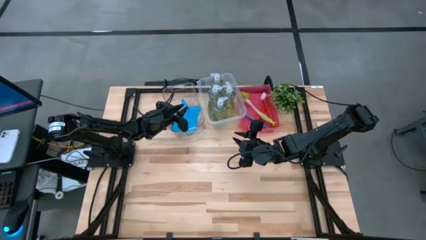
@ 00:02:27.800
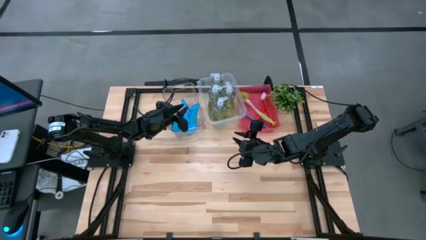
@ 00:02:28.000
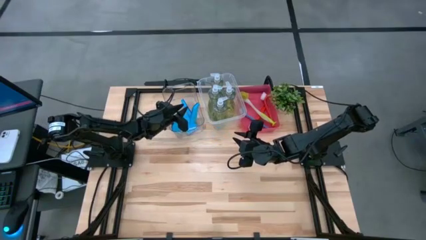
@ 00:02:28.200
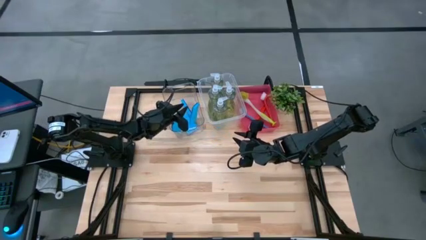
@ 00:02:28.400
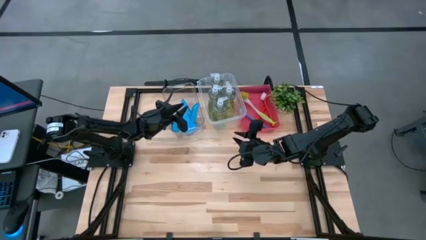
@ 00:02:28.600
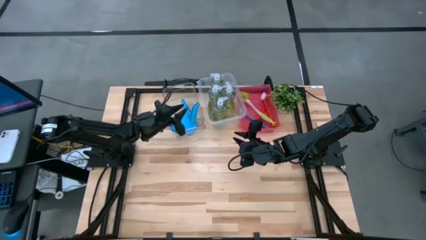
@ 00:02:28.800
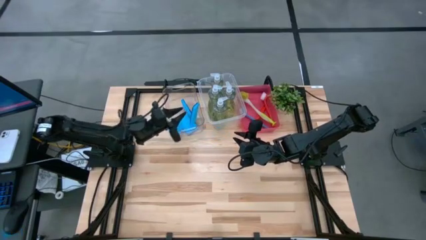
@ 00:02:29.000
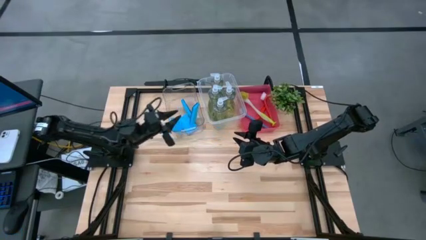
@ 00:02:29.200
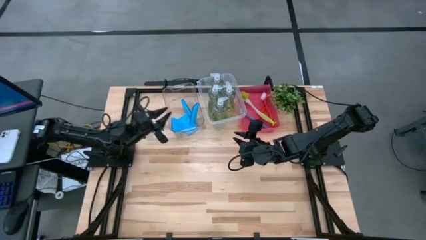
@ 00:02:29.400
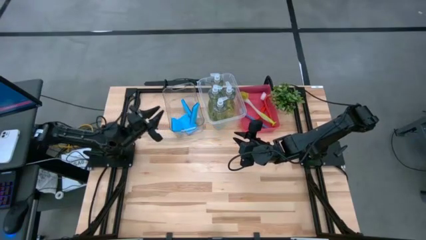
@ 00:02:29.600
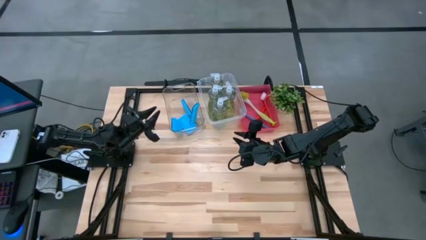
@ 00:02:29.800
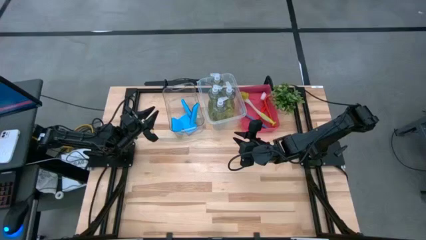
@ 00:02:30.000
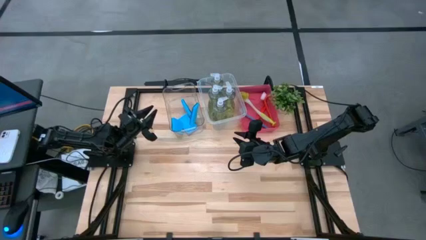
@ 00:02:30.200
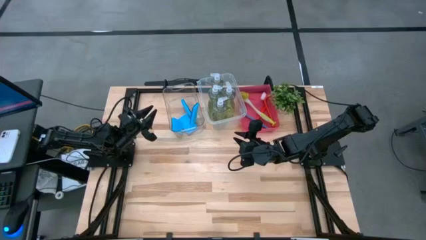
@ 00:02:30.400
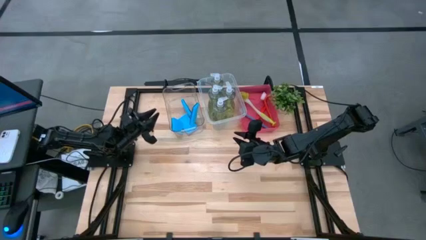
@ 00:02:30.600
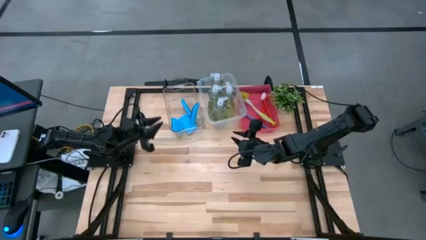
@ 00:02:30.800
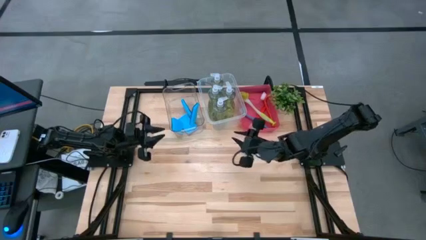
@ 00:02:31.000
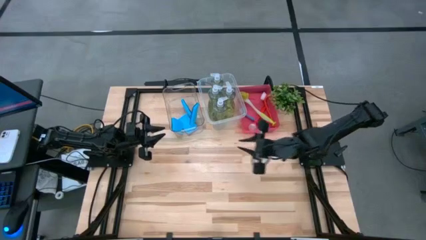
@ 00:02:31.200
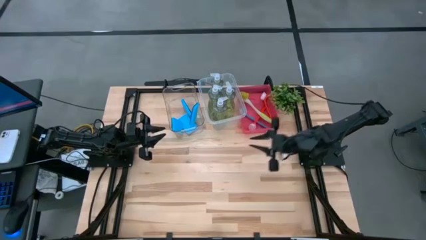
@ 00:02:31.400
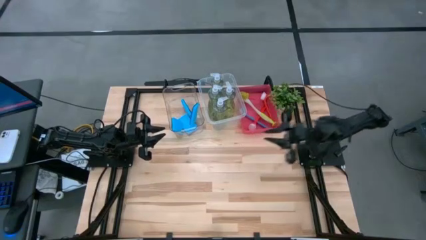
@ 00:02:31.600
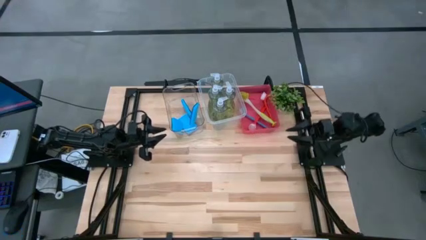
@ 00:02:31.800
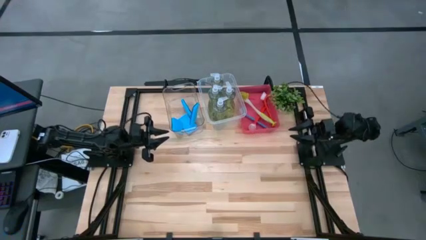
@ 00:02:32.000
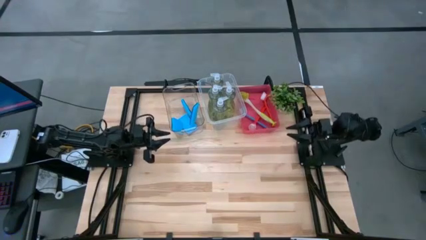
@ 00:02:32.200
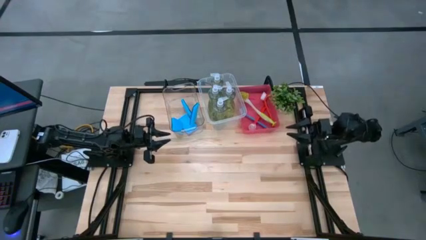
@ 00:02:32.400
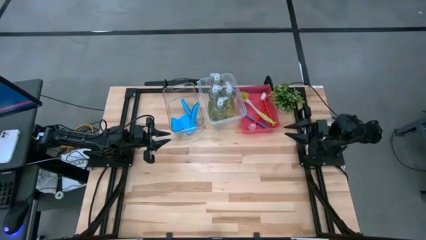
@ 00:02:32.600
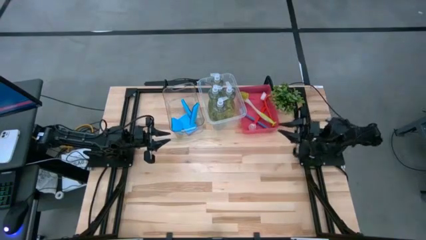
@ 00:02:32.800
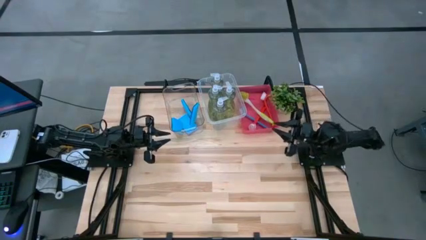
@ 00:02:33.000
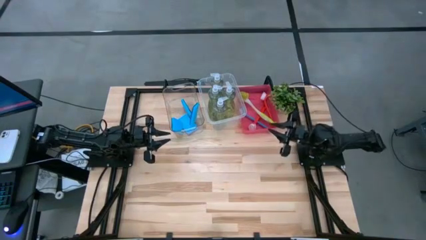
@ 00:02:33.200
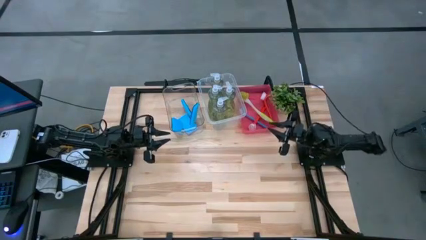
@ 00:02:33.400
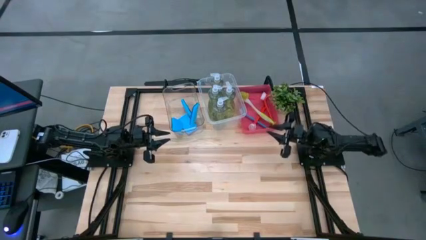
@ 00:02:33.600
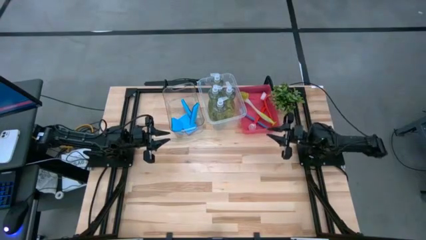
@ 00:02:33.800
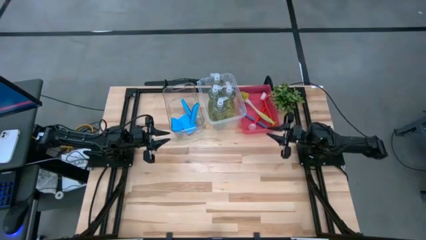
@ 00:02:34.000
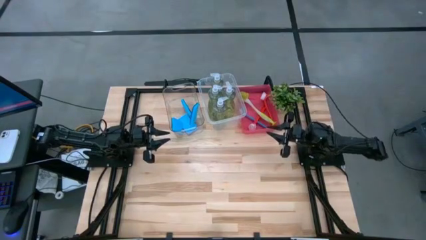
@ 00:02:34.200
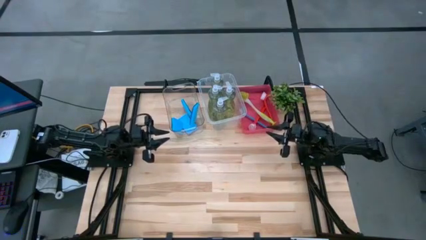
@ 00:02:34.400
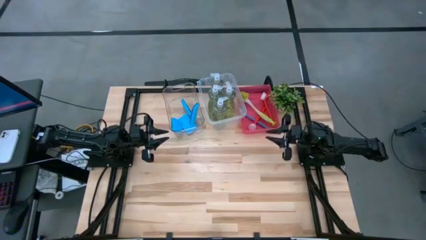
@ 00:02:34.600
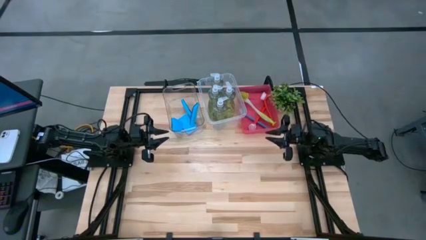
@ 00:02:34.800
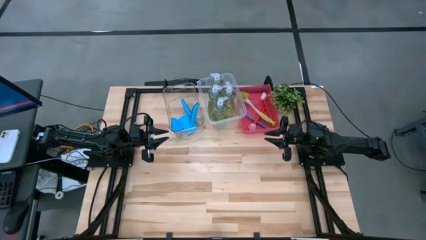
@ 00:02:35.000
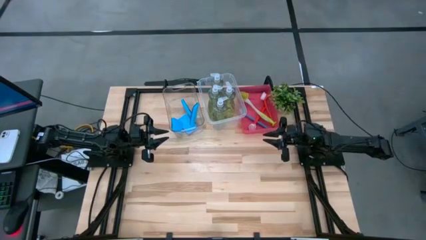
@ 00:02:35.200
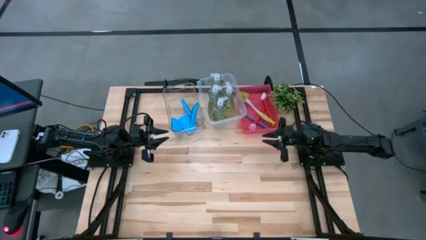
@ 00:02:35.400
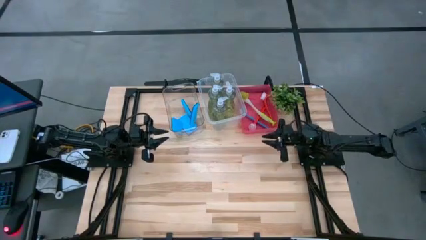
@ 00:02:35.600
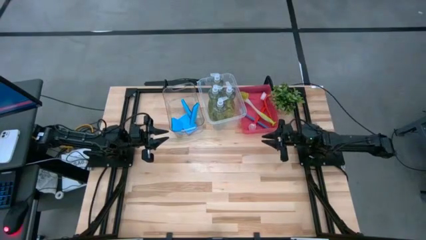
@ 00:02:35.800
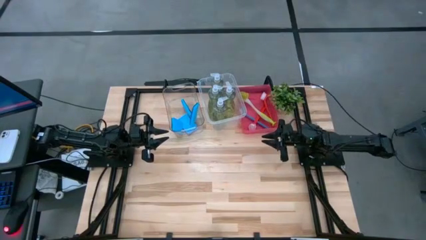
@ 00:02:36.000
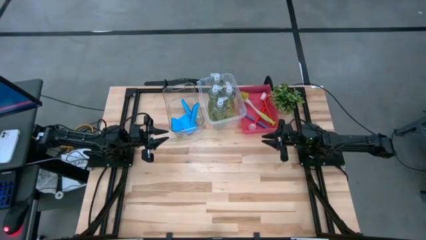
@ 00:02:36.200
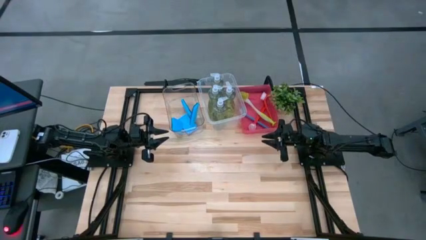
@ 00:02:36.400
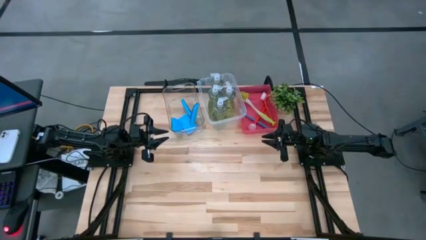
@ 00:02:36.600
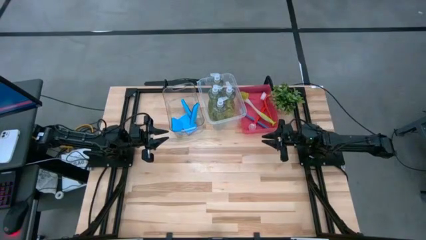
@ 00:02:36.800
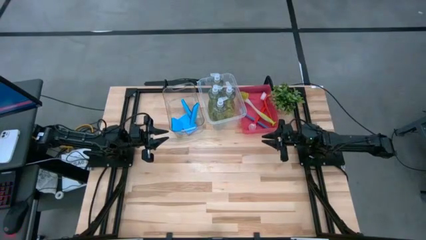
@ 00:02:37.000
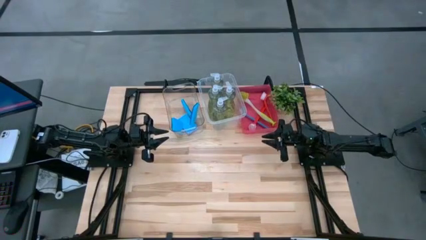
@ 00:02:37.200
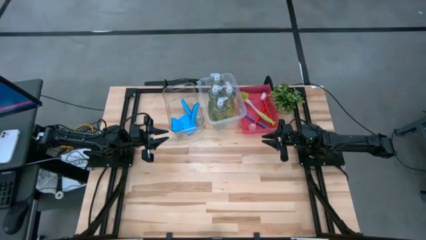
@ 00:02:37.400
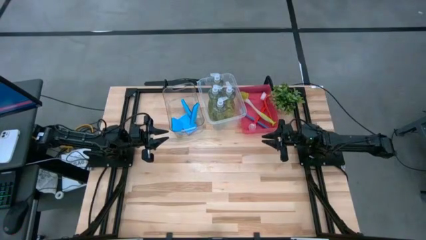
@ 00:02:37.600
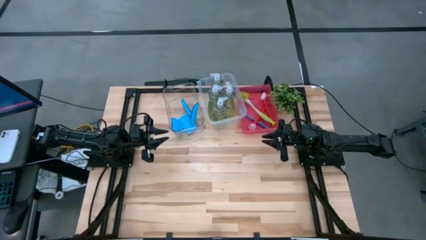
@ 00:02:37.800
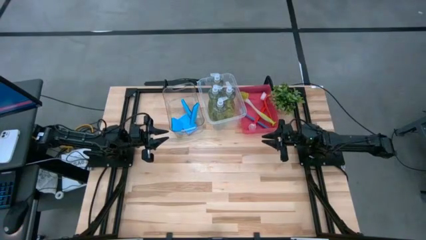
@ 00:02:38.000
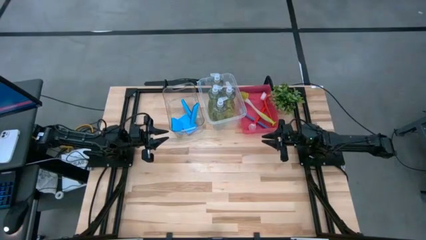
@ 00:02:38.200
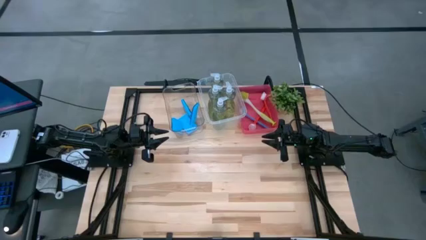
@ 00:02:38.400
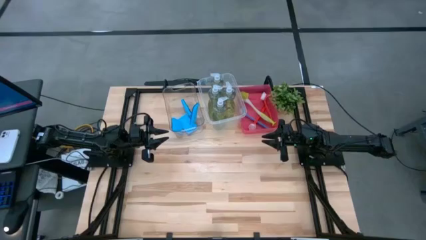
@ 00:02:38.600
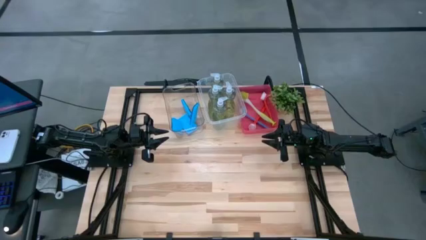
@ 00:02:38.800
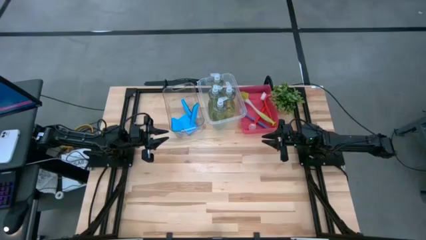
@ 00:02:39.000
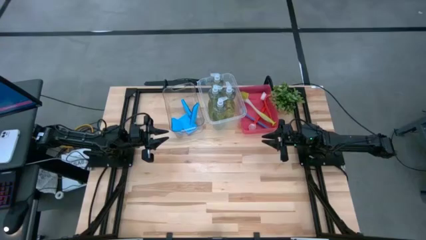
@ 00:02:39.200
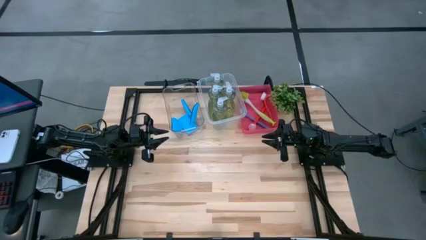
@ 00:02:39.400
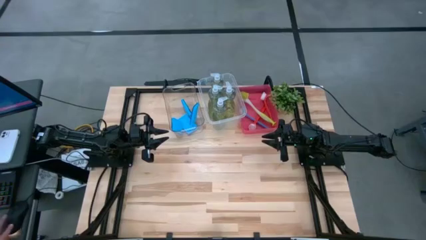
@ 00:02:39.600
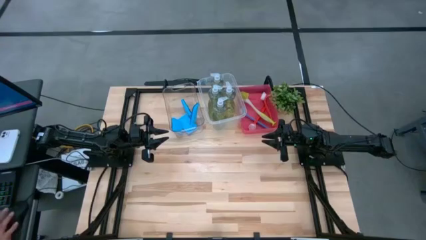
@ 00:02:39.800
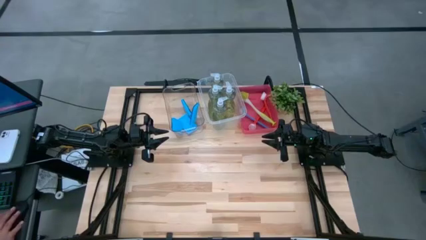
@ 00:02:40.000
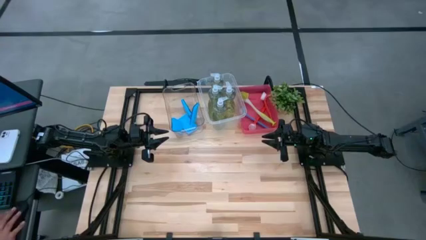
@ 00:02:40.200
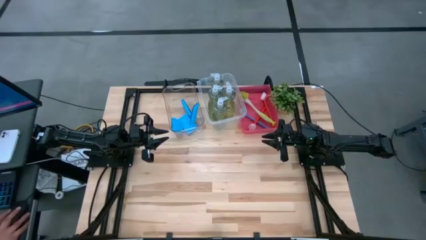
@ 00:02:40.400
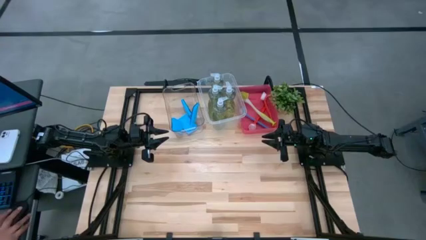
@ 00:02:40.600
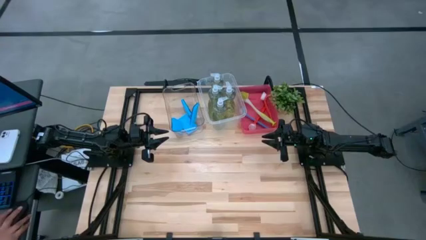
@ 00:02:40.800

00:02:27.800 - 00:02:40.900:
Task: Pick & Place Kitchen Sink Supplies
Return to Home Position

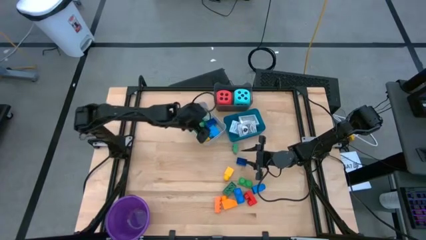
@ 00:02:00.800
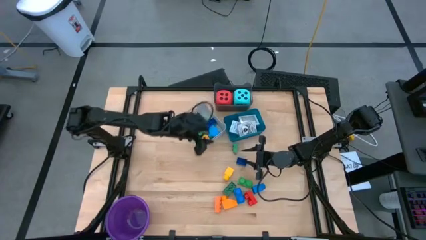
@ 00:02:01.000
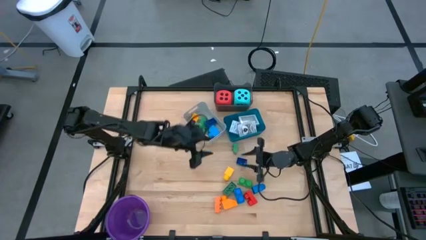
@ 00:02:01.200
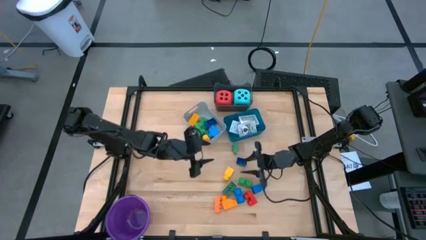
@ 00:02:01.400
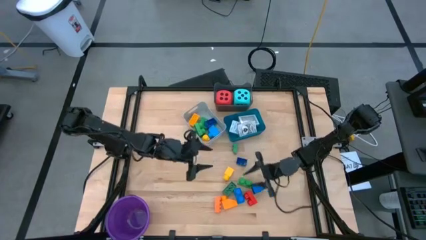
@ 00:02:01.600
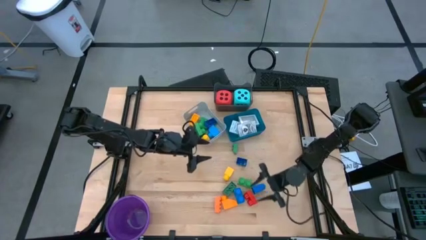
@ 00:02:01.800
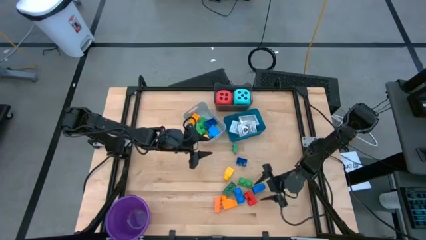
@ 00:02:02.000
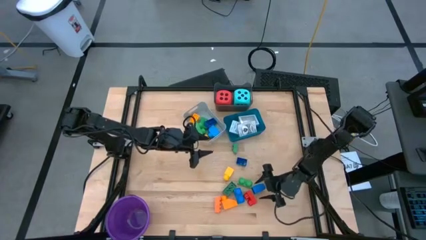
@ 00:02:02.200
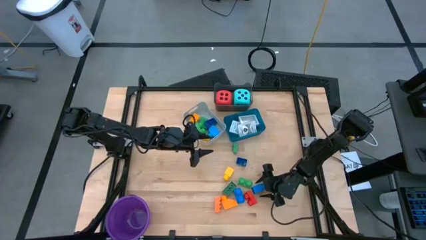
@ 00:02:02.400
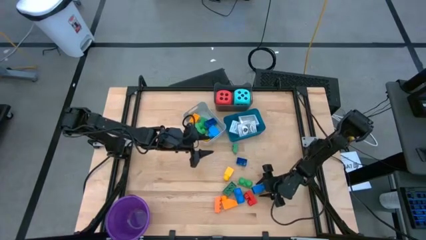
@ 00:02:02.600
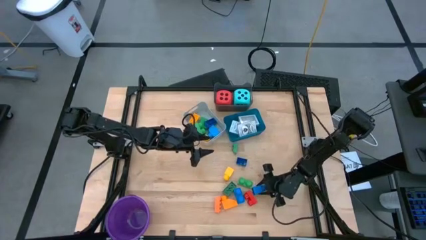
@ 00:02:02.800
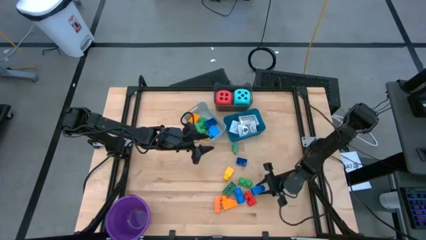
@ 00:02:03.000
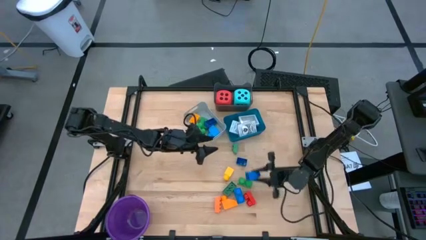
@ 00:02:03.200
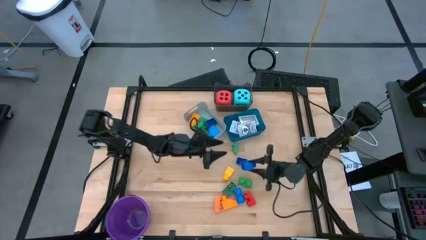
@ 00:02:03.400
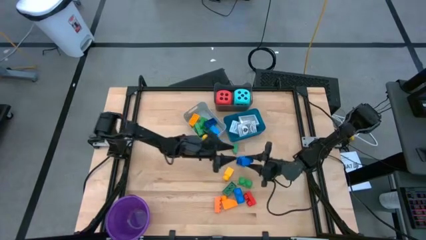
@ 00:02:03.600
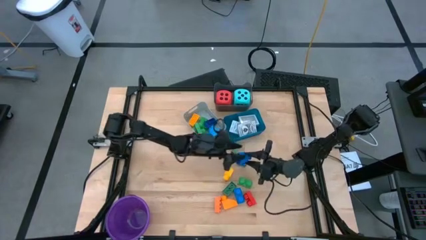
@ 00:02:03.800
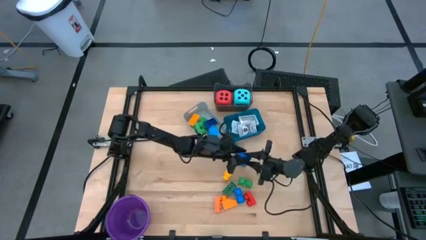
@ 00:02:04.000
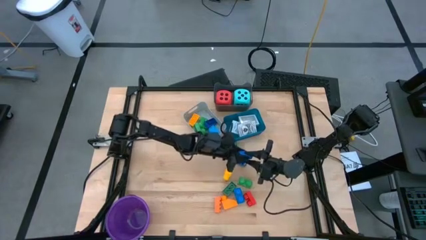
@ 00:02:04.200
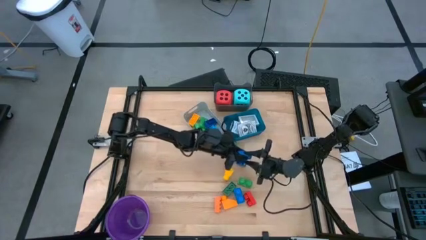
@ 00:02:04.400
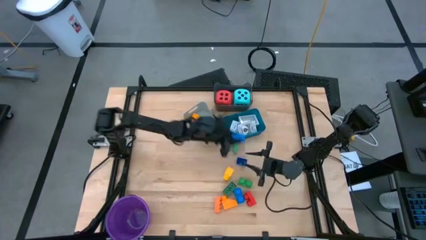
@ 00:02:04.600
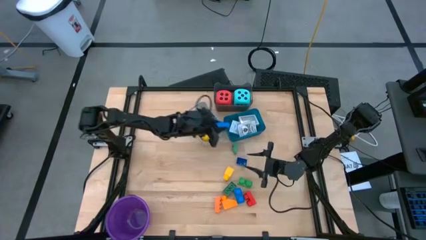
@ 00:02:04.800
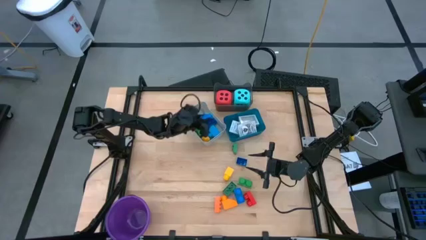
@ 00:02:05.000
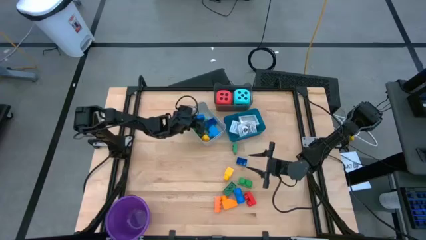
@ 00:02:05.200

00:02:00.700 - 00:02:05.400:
Task: Pick & Place Toys
Put the blue game piece into the gray bin
